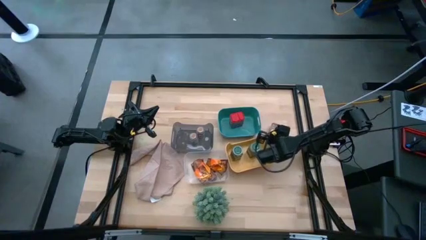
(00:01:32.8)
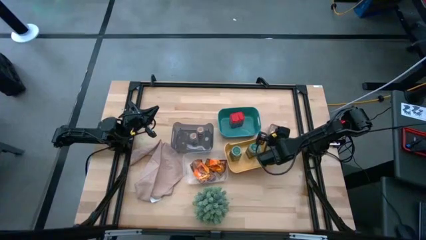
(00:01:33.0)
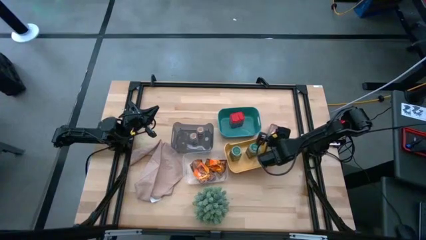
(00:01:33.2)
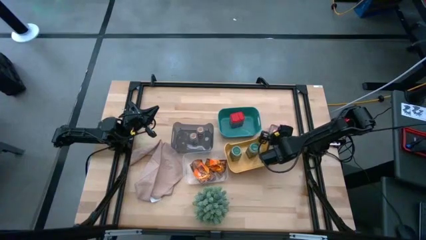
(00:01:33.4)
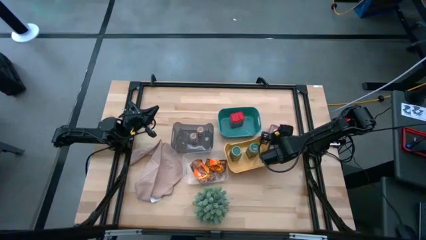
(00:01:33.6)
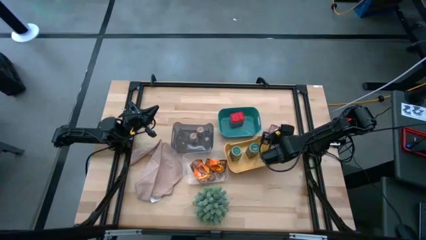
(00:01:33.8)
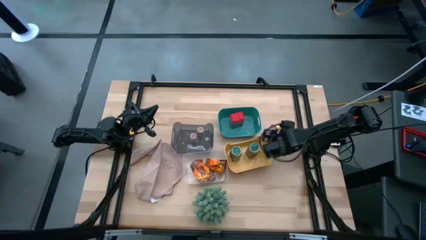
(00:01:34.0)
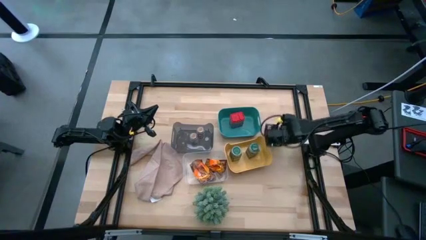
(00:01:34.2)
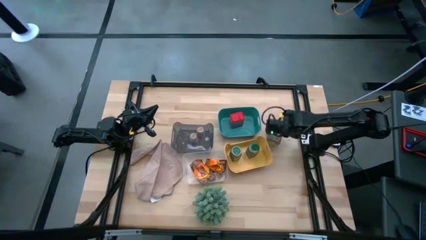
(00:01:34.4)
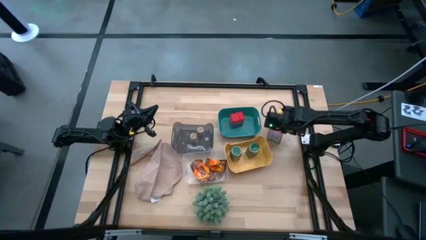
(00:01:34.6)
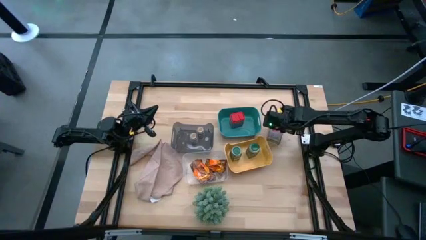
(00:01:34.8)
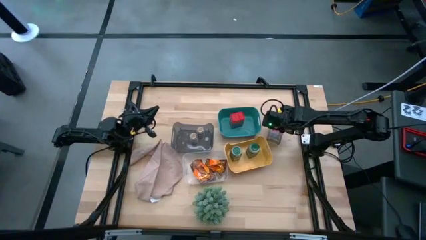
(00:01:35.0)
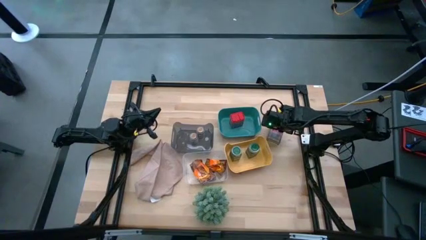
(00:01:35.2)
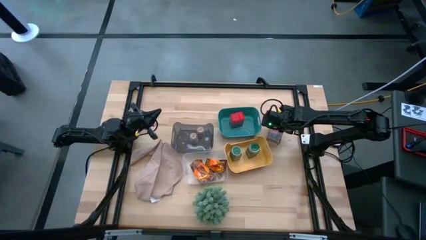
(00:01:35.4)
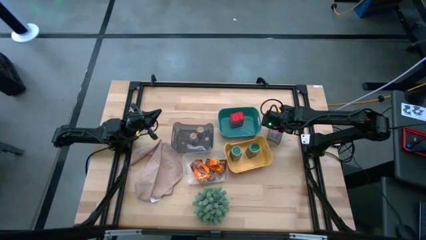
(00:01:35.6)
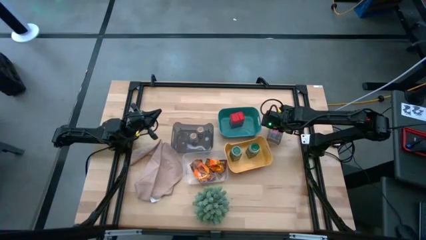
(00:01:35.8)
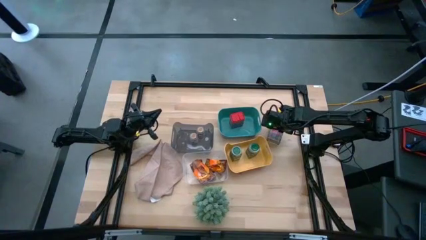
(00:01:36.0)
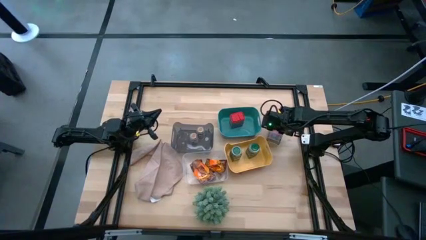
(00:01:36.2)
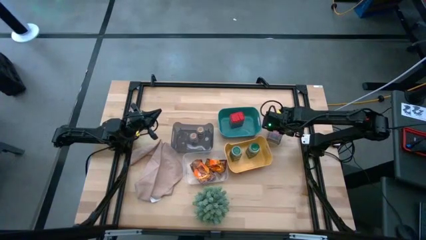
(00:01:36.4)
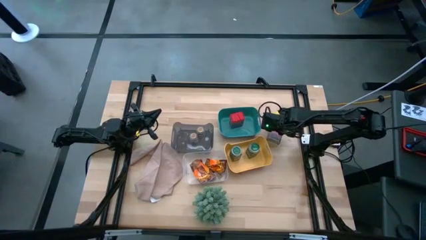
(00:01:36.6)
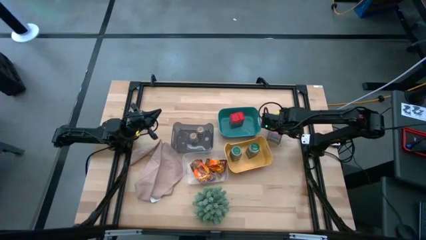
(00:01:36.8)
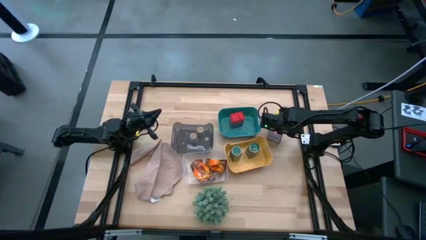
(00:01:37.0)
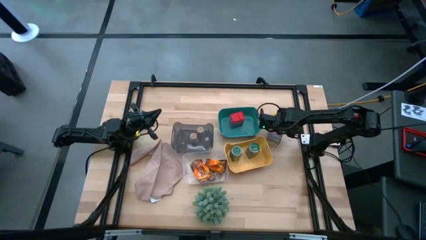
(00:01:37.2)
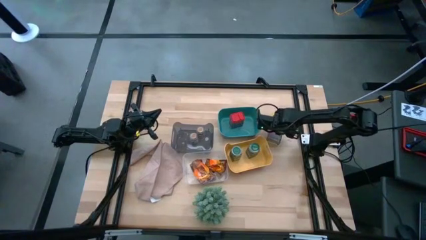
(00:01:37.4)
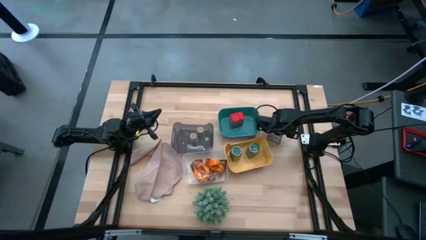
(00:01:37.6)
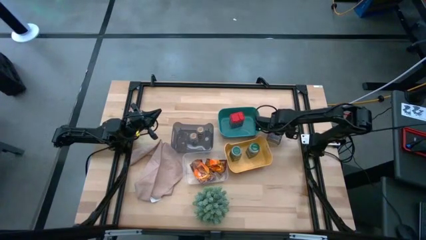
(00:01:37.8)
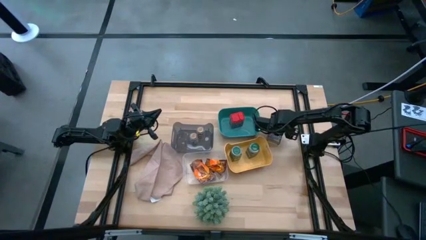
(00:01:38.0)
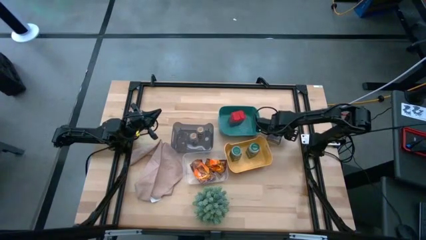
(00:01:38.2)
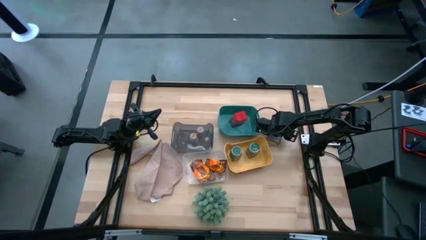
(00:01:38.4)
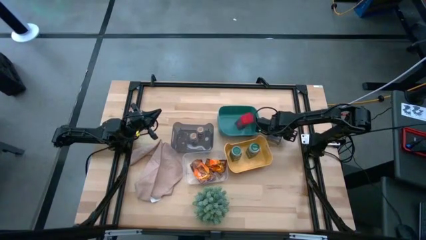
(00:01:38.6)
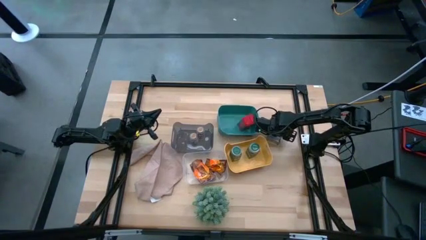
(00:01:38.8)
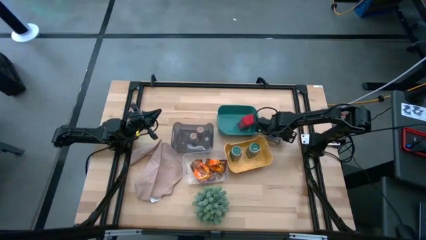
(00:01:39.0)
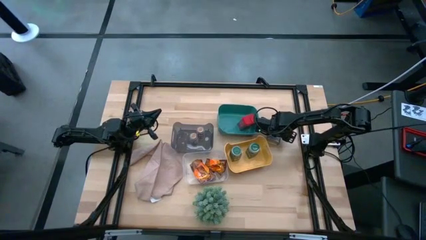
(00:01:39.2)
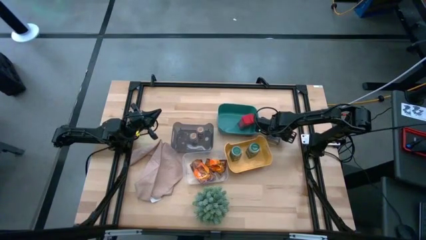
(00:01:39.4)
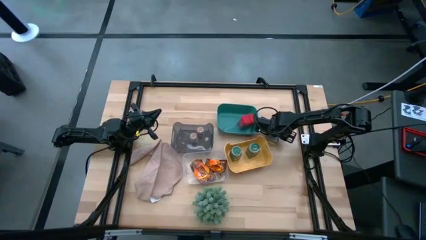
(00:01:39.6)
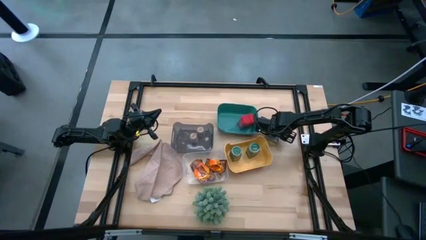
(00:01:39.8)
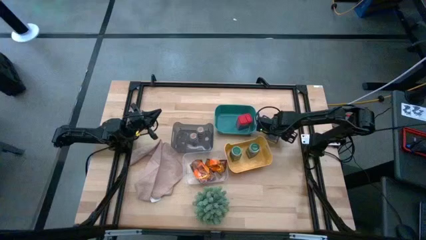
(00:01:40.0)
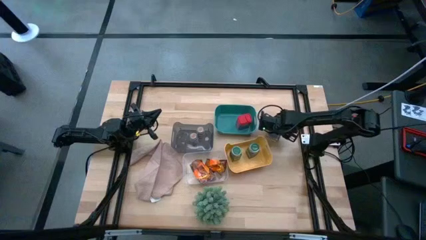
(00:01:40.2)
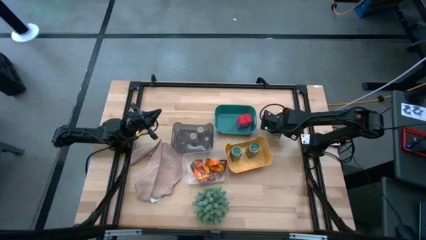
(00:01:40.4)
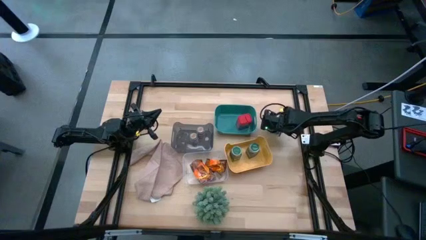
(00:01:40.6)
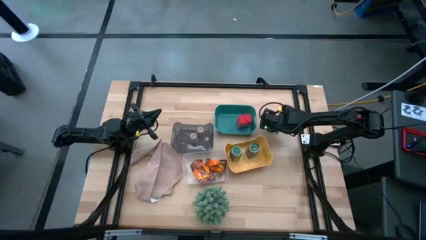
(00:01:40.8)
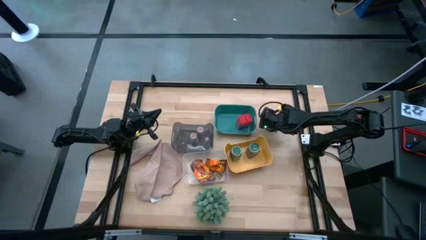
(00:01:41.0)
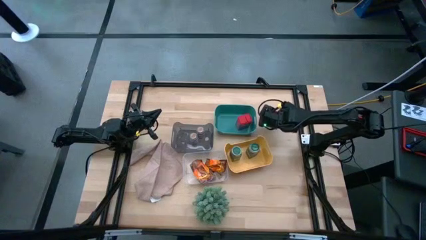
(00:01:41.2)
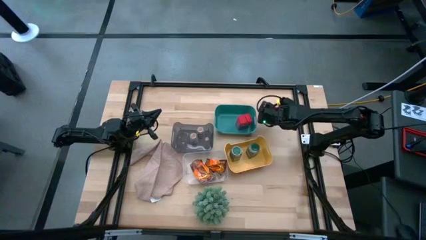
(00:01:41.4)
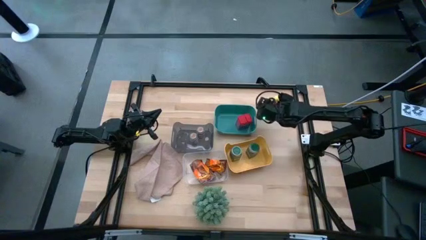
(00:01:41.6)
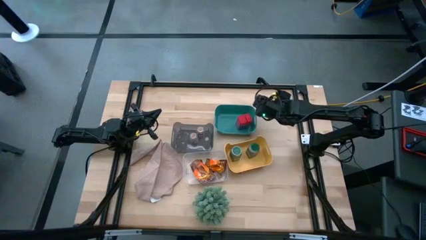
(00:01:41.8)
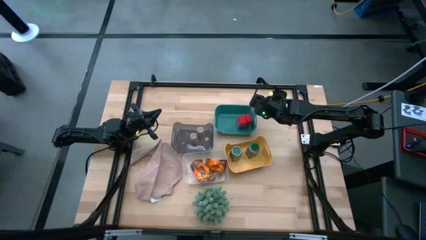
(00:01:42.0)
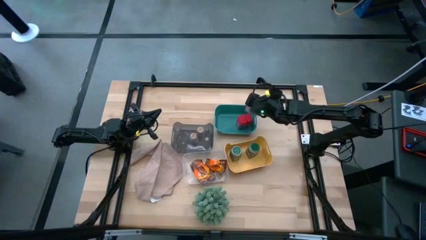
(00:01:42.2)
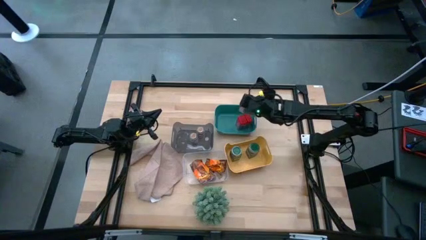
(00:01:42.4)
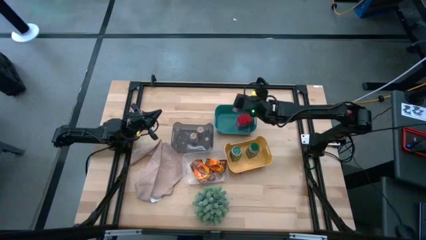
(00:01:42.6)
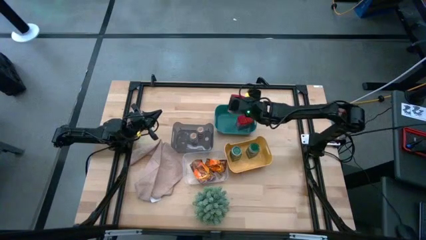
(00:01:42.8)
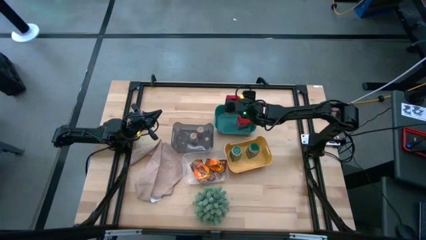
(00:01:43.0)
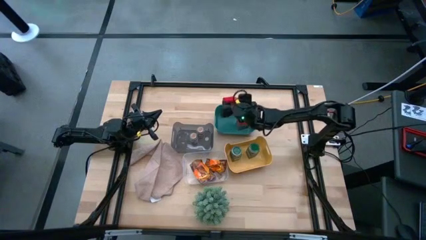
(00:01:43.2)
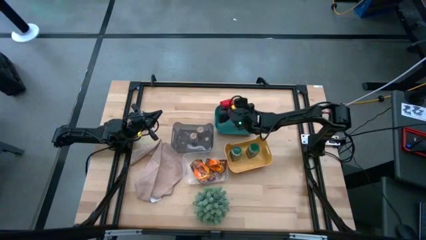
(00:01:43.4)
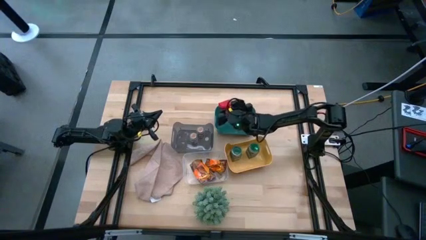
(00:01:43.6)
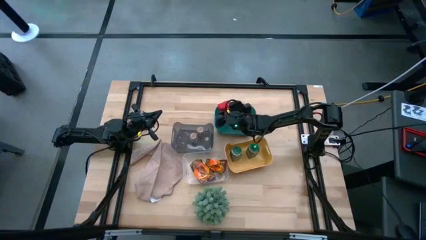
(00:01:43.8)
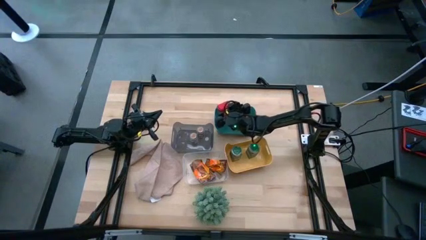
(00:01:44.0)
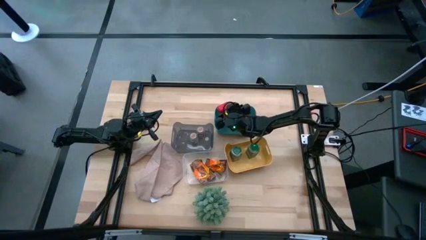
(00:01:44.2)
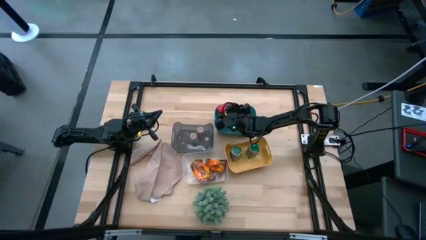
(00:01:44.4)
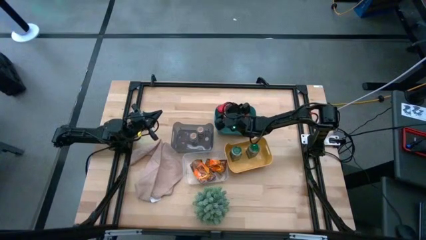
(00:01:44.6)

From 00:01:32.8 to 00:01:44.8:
Task: Sort spices by type
Put the red seasoning can into the blue bin

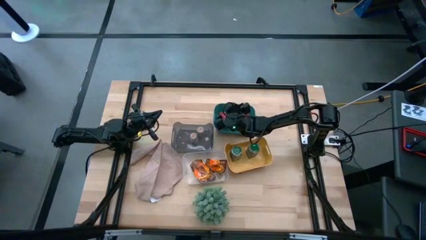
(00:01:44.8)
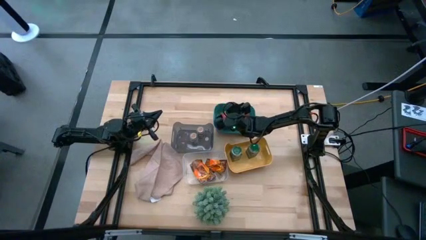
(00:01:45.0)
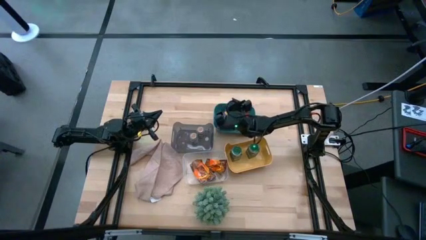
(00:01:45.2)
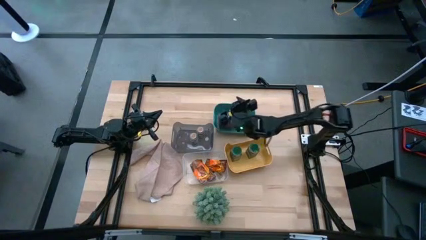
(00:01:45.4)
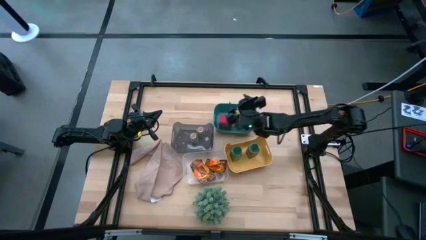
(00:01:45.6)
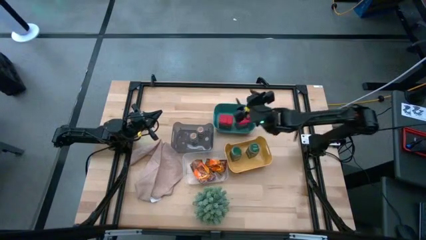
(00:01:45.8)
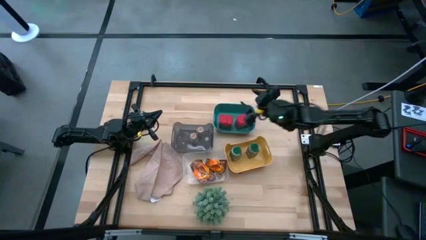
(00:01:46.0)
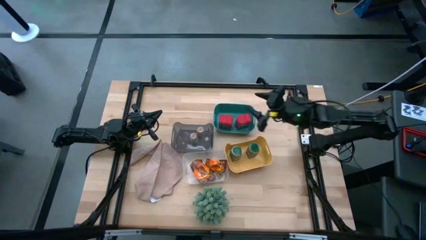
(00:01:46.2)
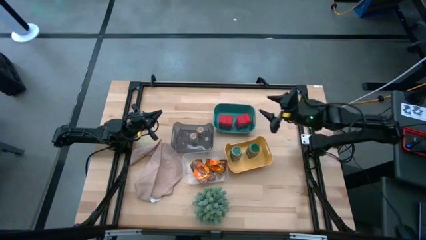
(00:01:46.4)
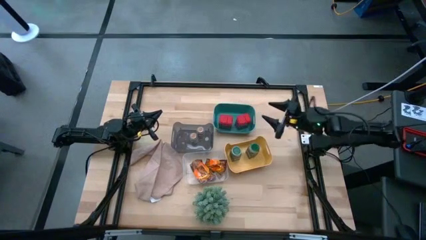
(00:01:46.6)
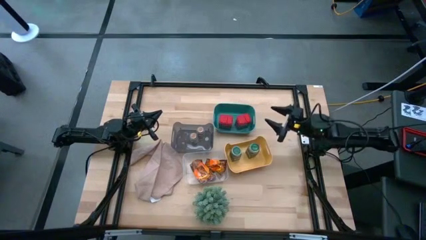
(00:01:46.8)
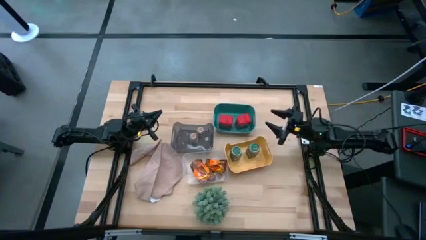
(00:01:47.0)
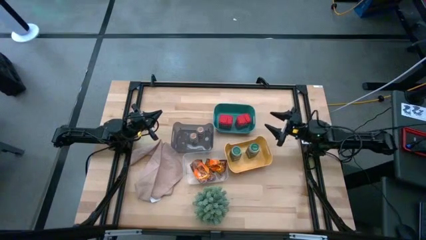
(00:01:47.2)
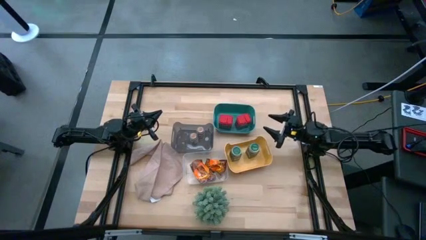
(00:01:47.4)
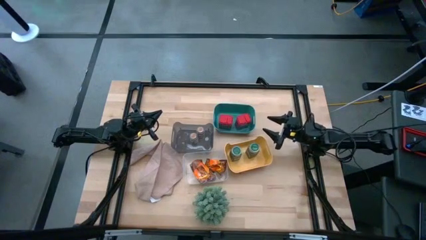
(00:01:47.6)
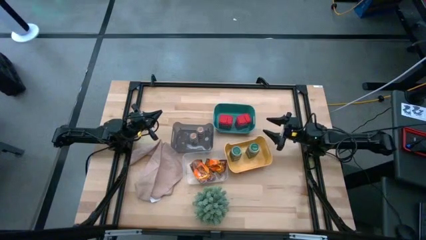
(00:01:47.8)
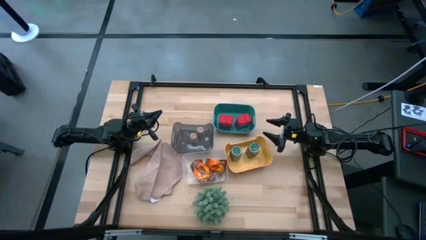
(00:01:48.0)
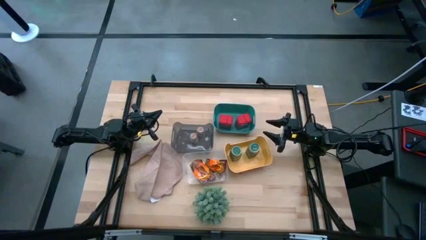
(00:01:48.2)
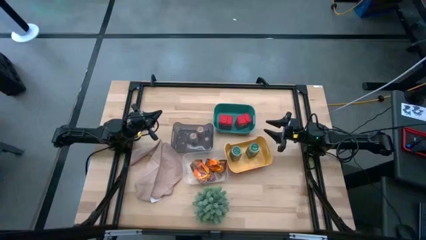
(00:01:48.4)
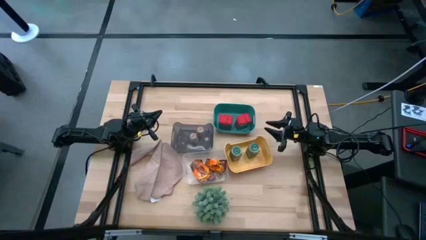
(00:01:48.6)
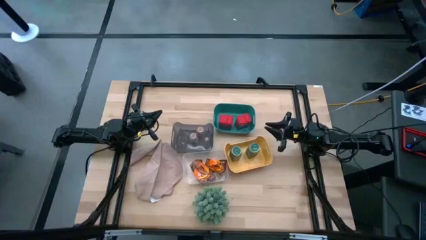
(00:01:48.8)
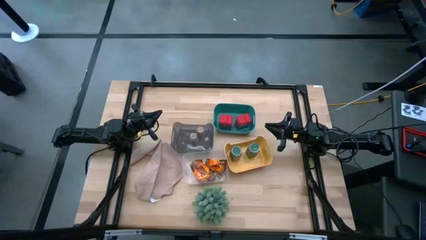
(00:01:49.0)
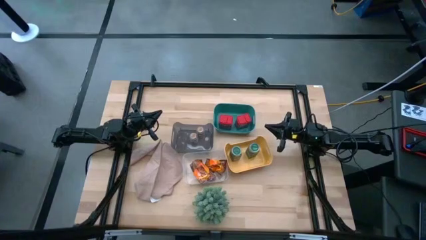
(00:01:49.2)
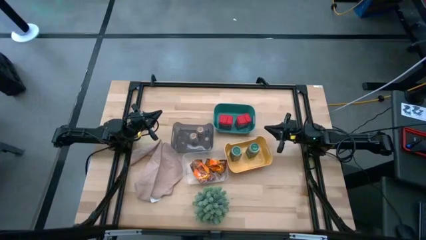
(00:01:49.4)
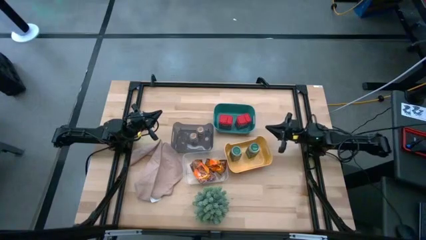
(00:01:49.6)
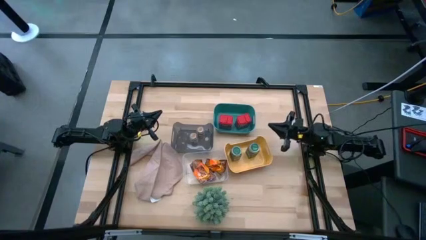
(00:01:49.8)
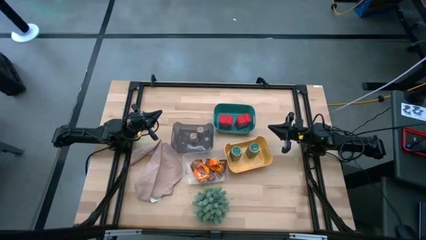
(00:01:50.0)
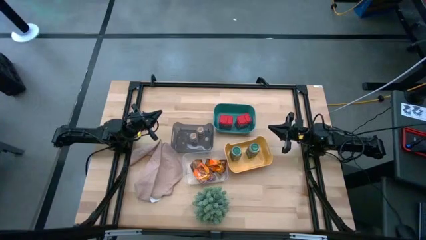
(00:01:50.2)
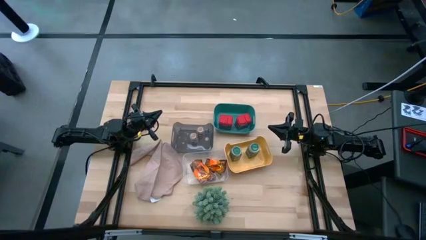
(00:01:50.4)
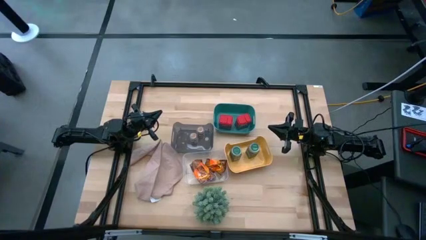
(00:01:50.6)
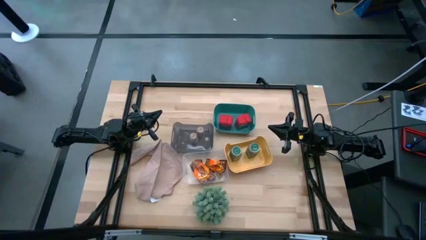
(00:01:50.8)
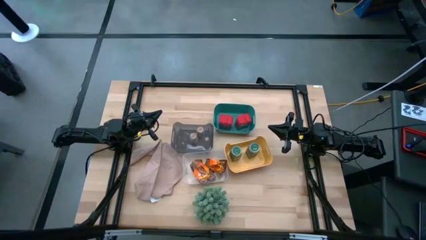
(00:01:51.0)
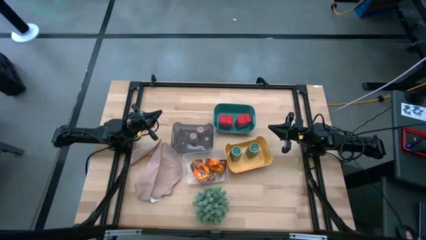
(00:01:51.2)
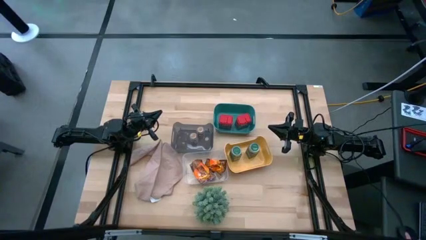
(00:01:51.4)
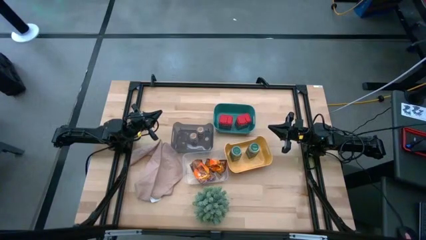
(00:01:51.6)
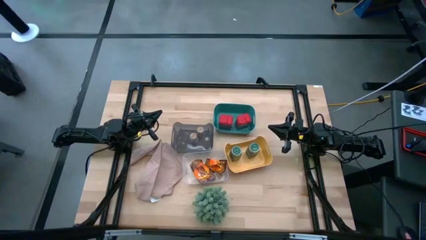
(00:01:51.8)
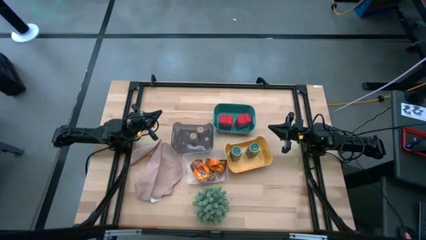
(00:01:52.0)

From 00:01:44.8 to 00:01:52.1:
Return to Home Position
